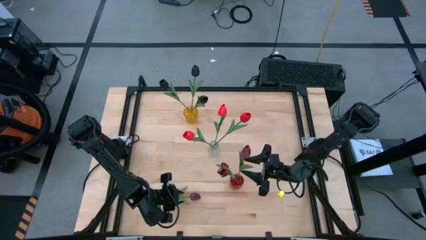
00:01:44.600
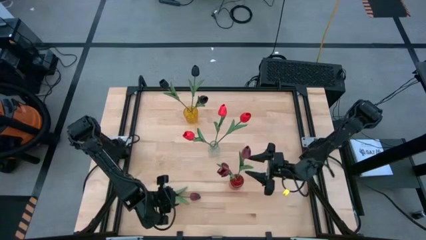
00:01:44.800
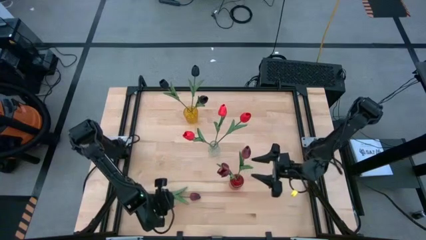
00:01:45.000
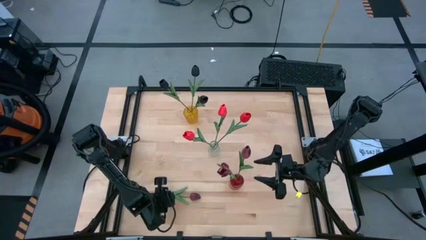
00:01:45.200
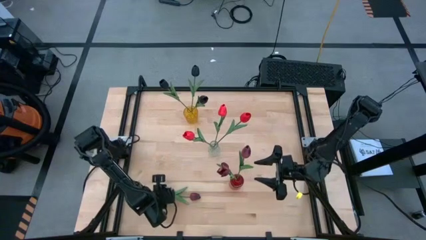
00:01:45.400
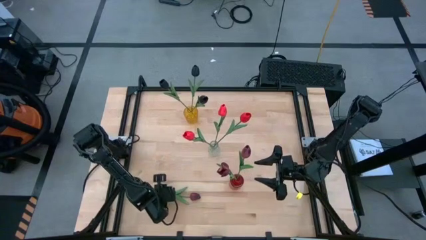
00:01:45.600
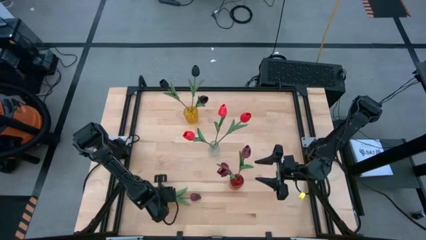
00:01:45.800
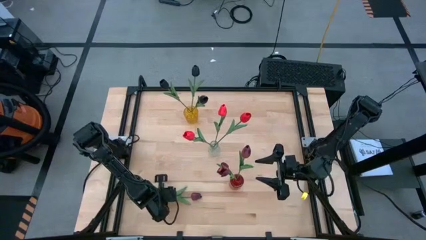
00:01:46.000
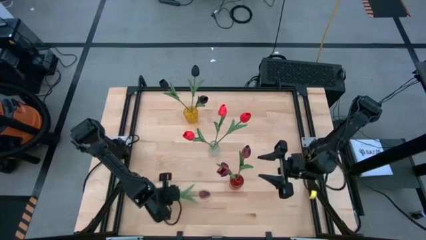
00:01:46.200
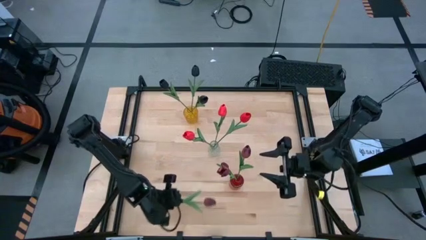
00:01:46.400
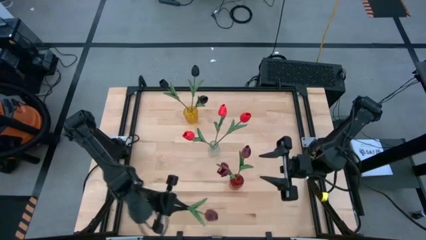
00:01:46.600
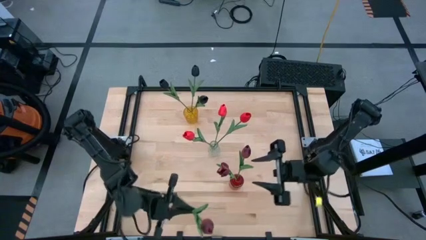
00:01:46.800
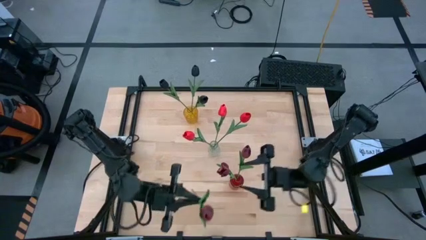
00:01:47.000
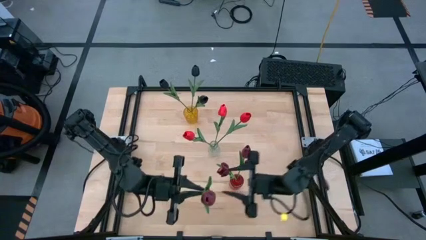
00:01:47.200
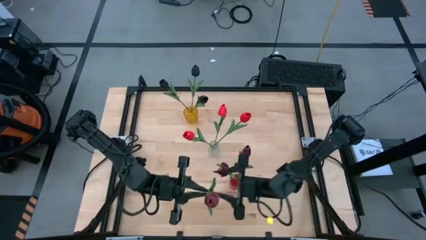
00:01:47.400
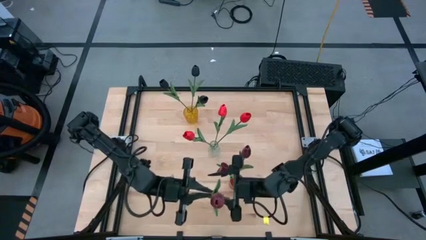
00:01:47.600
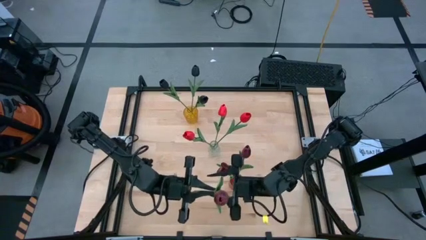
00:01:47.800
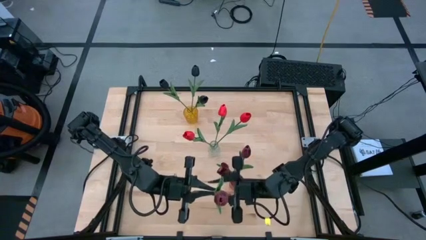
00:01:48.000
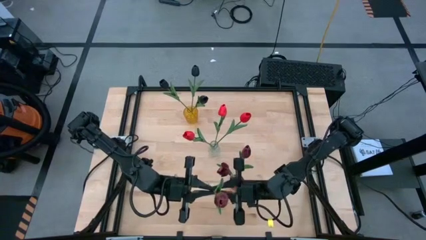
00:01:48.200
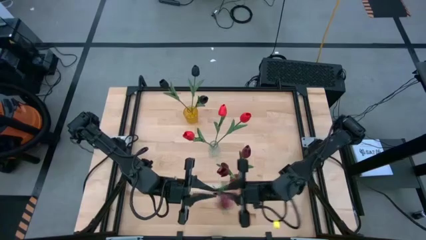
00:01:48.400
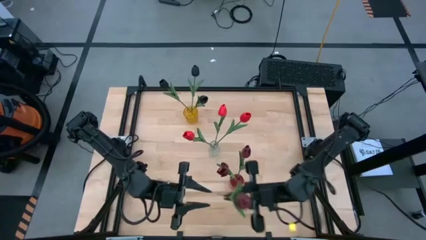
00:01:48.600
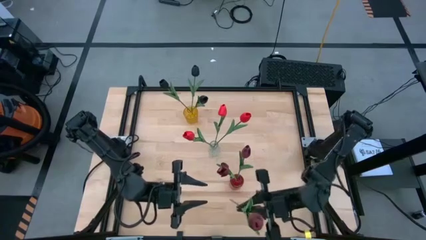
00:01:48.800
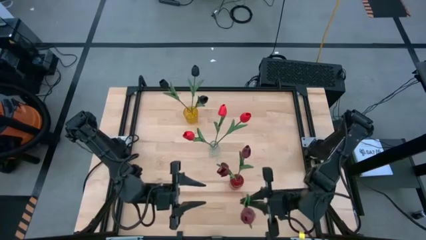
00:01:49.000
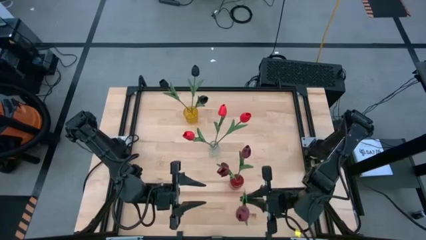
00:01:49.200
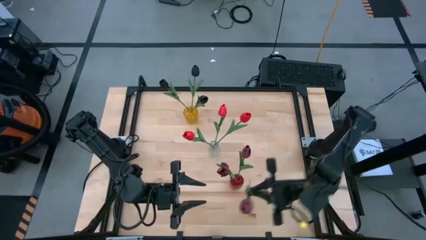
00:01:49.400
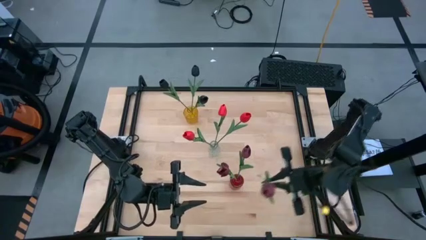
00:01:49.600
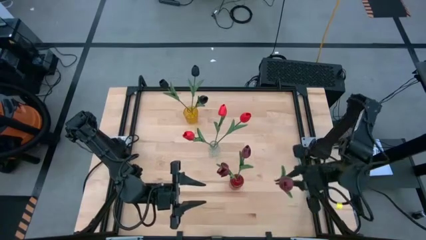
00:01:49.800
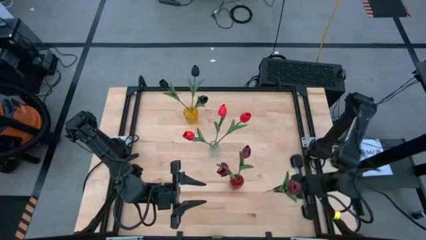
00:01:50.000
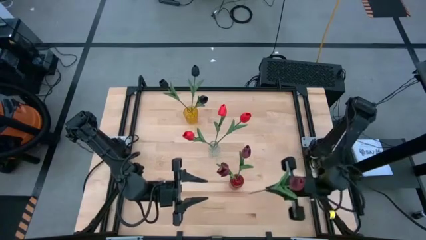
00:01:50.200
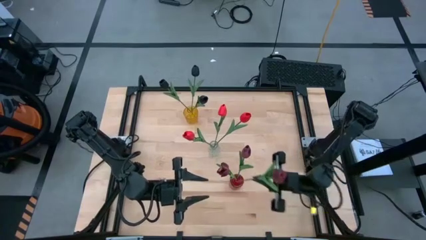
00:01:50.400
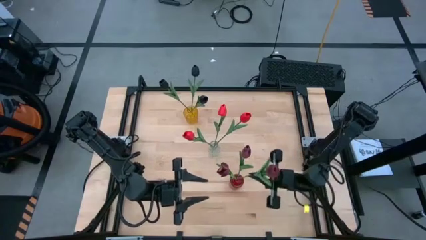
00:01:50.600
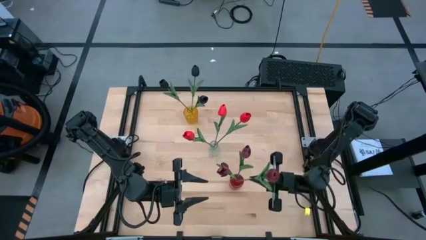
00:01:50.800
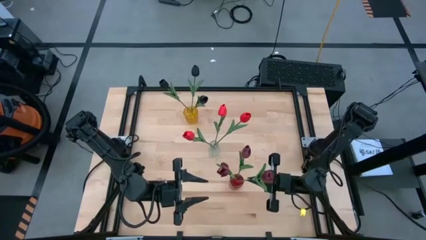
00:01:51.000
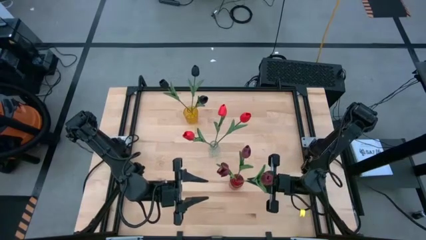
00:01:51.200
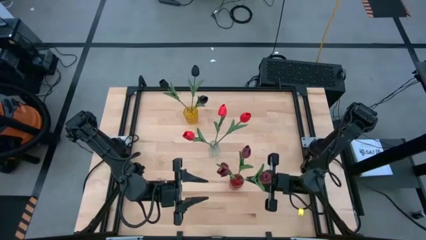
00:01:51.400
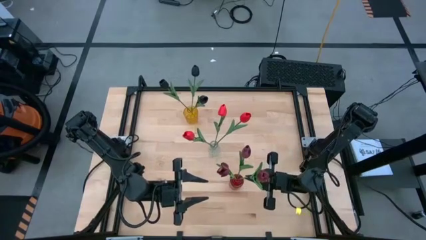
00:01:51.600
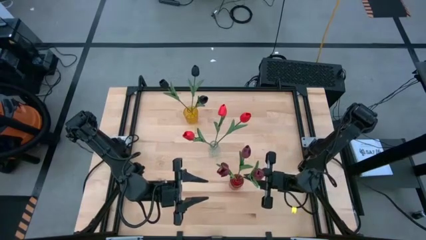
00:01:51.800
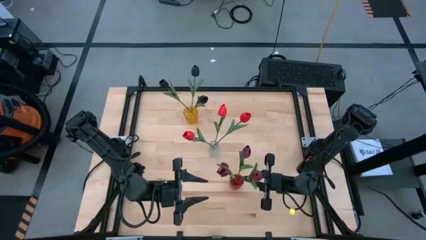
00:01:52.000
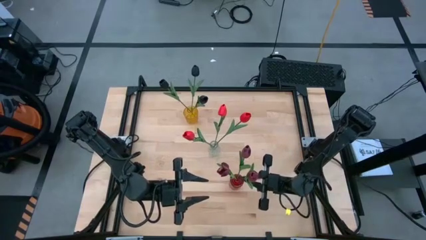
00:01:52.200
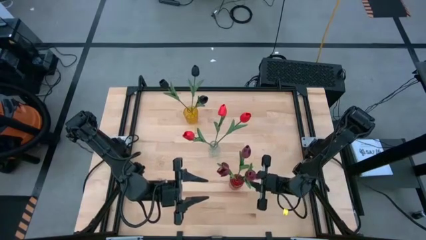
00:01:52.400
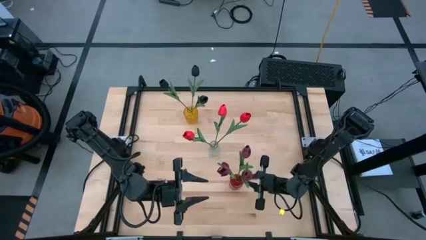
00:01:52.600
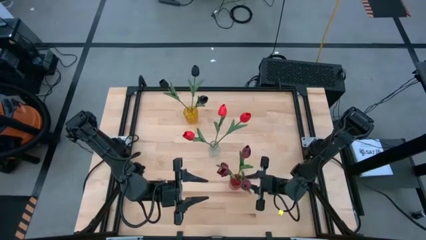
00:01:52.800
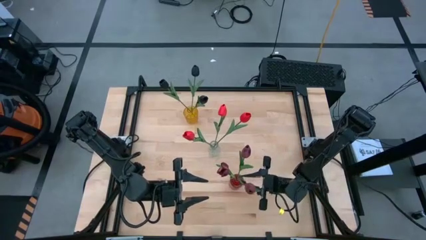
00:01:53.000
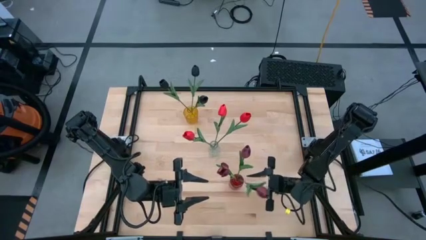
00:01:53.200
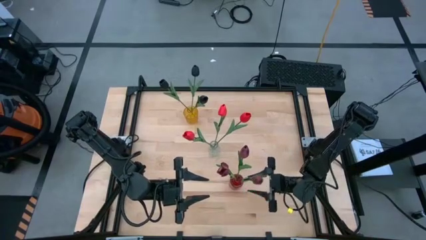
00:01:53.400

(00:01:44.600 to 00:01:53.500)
Task: Sort flowers into vase by color
Put the dark red tulip into the red vase

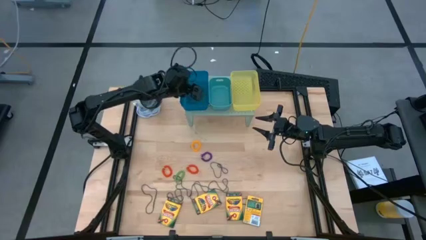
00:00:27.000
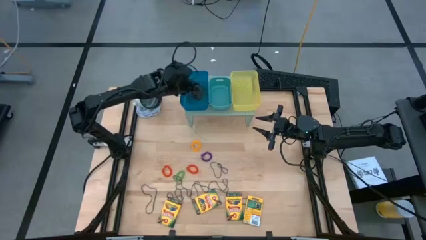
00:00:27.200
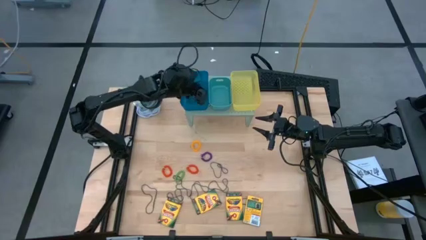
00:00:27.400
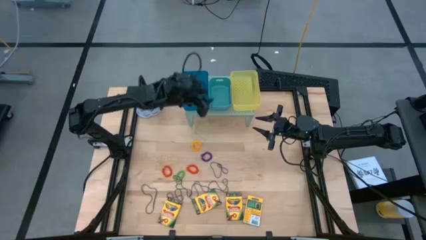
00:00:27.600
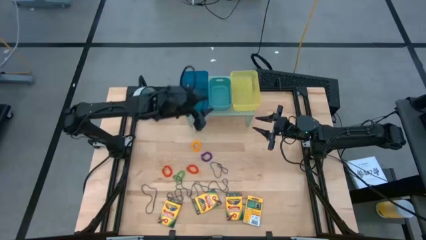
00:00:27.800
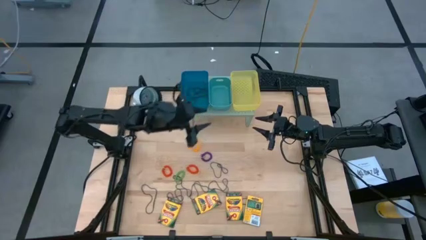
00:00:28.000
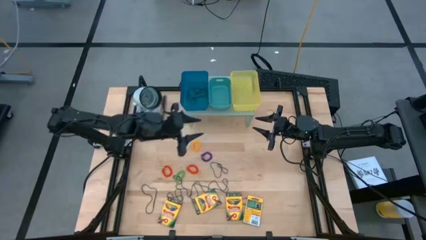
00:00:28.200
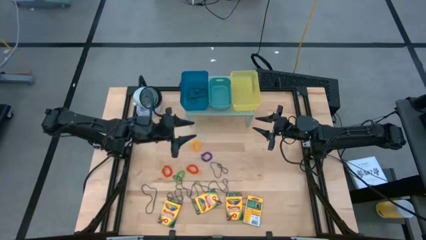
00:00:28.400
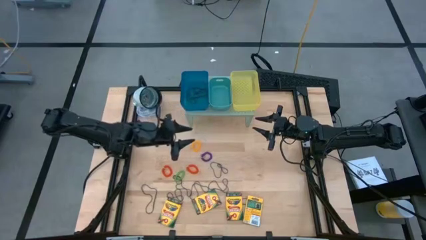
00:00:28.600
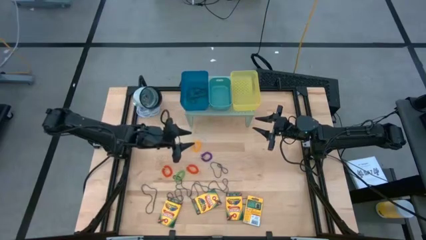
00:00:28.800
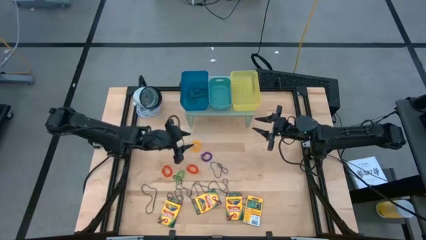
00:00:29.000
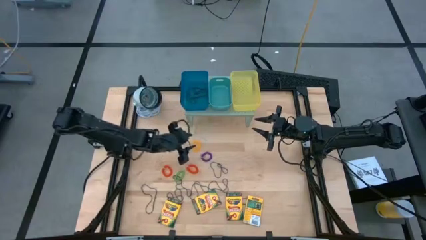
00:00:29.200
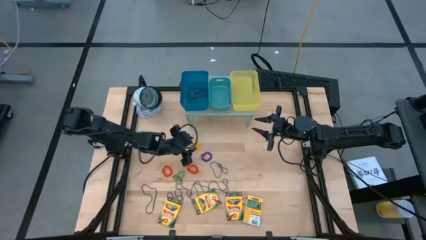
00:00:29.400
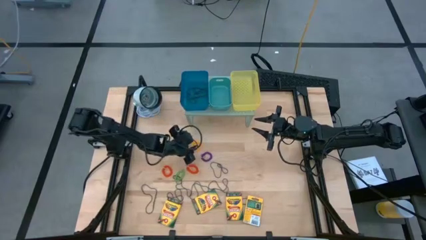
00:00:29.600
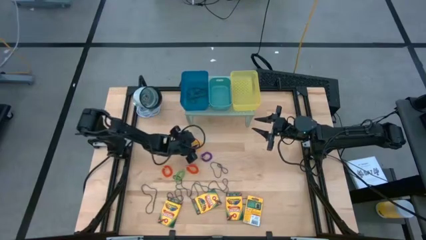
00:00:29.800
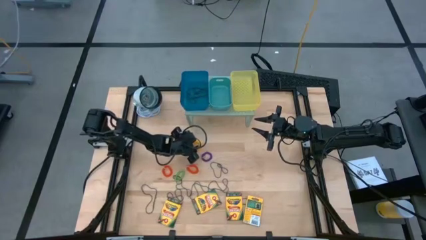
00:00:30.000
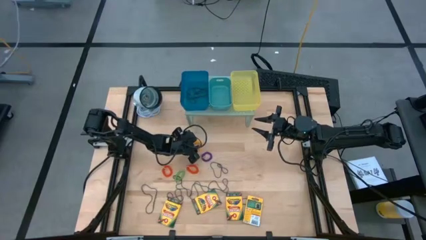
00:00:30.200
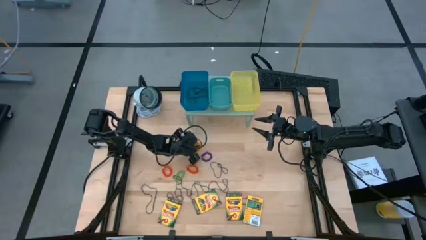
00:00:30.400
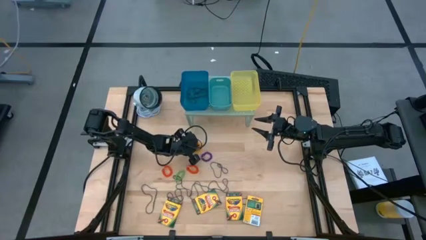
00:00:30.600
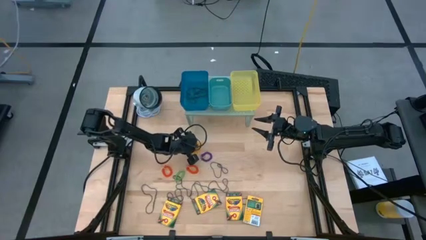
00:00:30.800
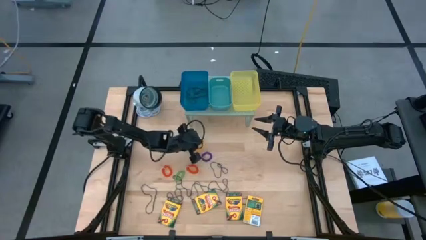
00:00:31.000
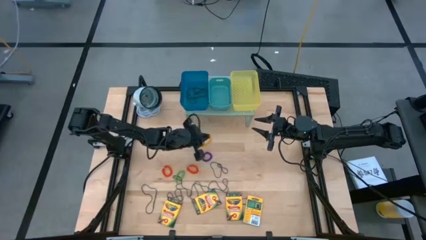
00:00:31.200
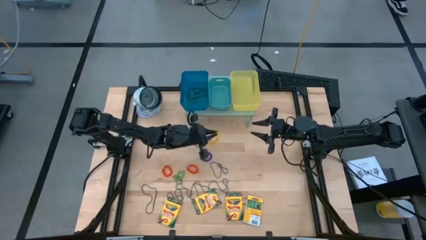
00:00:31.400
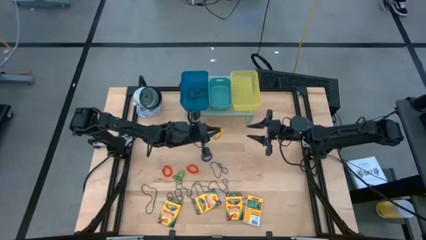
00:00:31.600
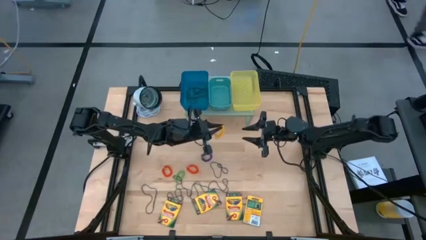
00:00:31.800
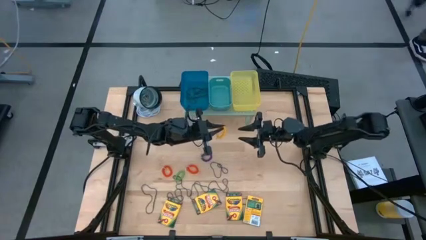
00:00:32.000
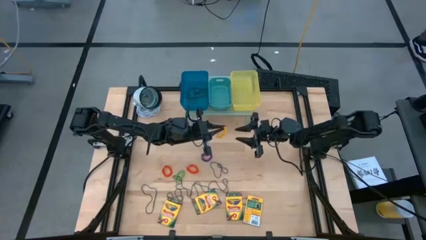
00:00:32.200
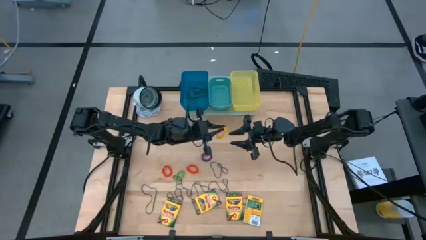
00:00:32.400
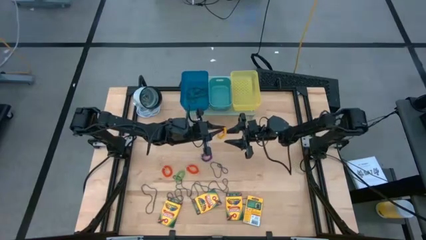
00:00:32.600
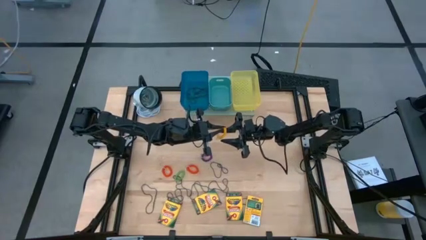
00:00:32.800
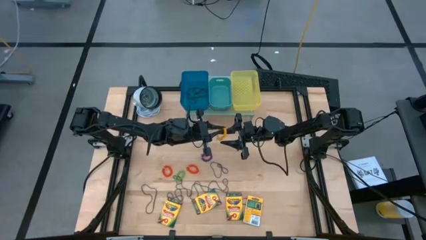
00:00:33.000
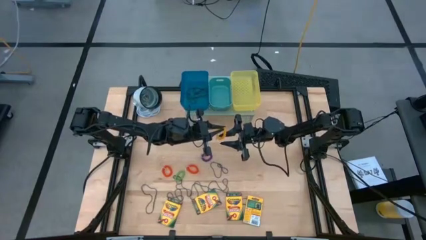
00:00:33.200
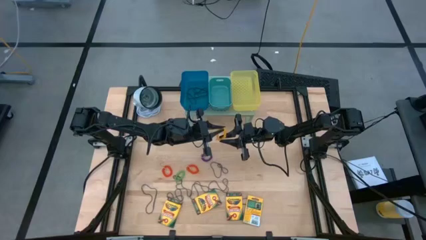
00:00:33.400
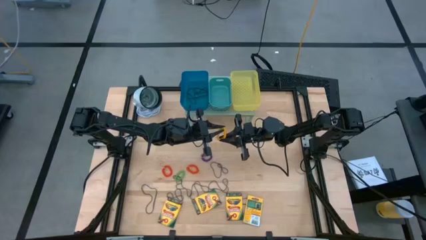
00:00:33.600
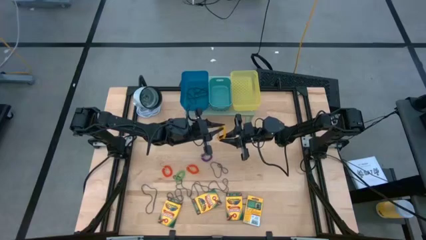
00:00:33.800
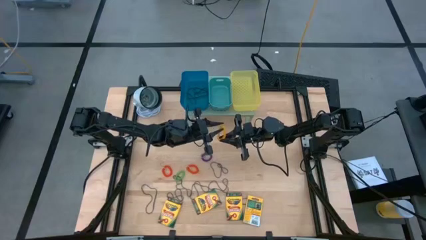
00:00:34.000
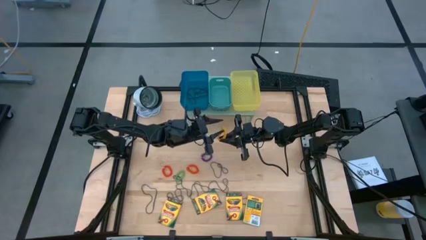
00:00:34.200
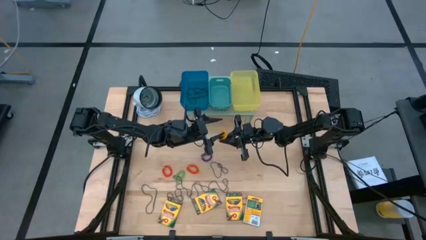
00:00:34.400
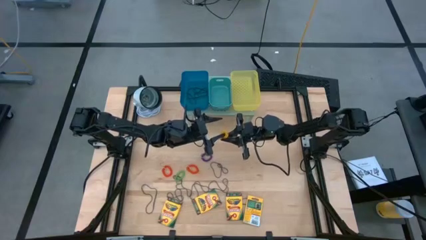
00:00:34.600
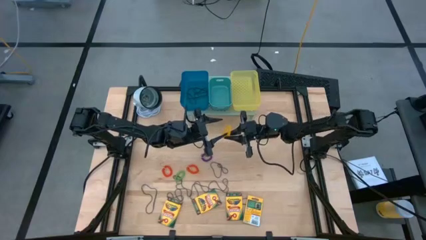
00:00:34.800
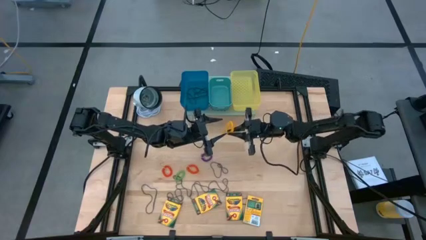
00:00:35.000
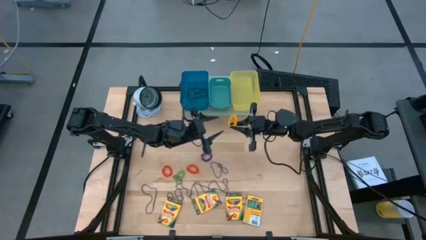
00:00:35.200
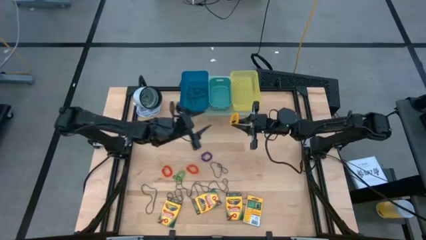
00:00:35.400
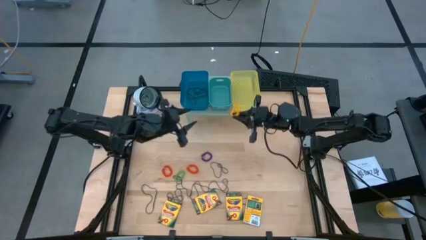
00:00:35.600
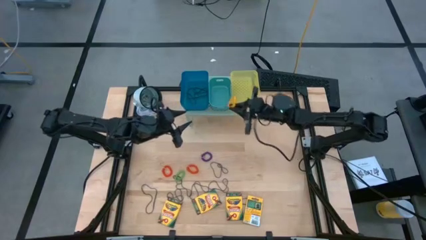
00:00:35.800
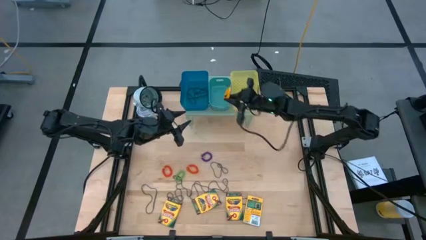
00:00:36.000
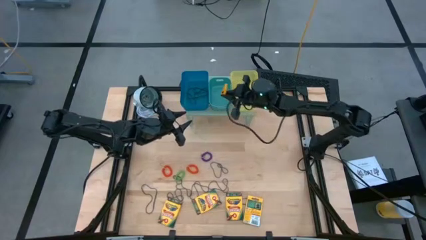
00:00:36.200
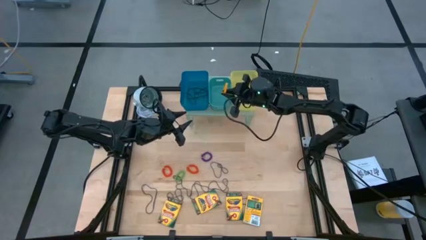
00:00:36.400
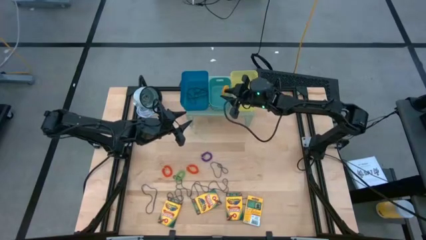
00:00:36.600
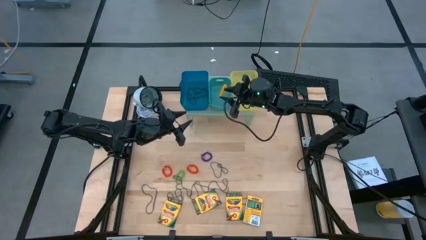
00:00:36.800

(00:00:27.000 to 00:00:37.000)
Task: Pick & Place Office Desk Supplies
Put the yellow spring keychain into the green bin on the shelf
